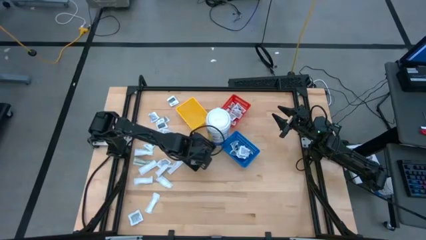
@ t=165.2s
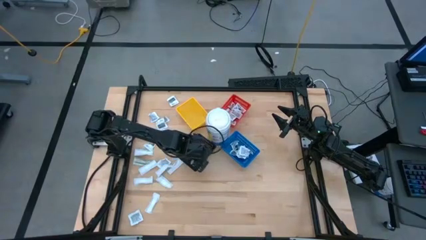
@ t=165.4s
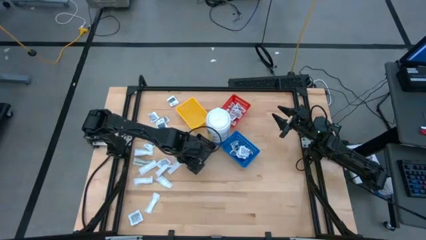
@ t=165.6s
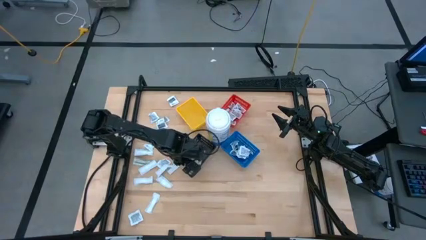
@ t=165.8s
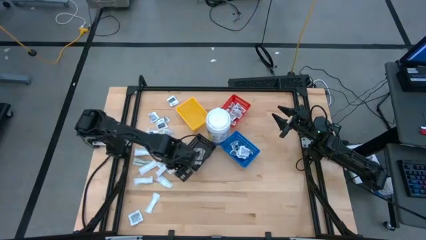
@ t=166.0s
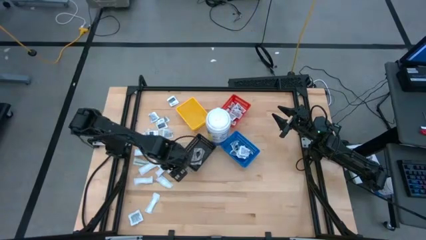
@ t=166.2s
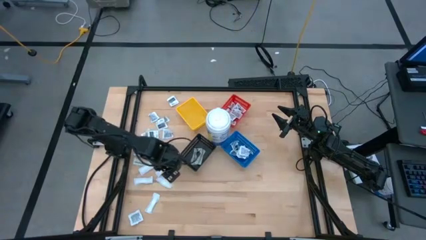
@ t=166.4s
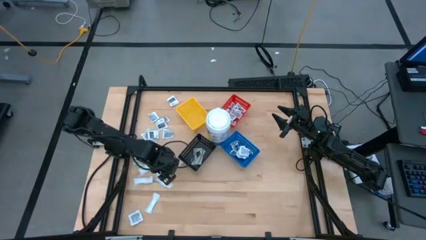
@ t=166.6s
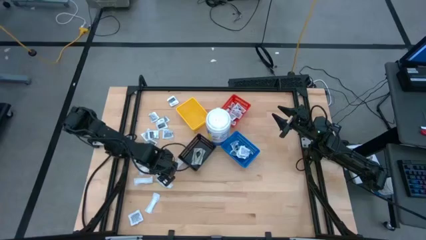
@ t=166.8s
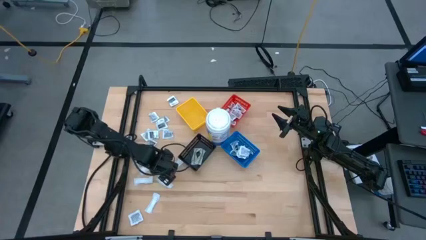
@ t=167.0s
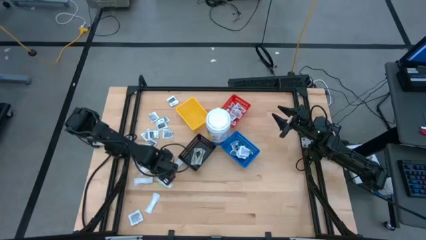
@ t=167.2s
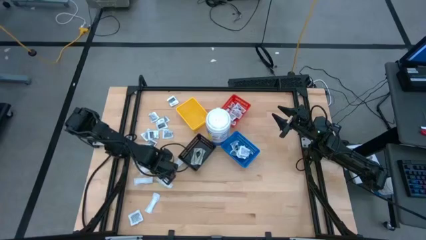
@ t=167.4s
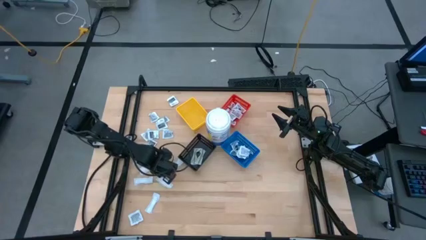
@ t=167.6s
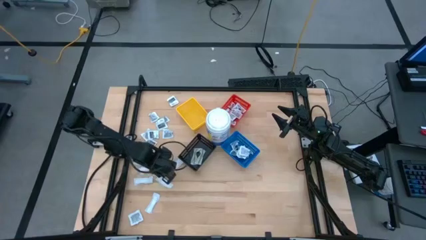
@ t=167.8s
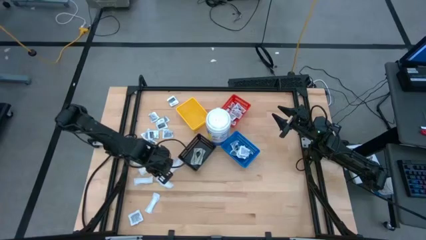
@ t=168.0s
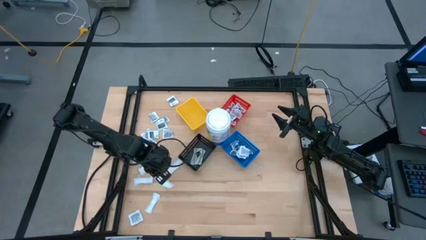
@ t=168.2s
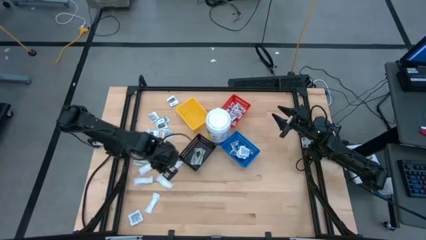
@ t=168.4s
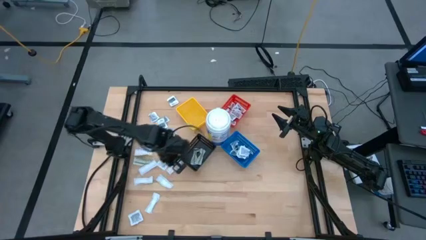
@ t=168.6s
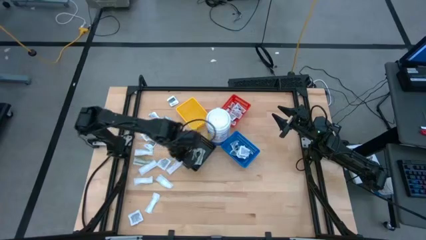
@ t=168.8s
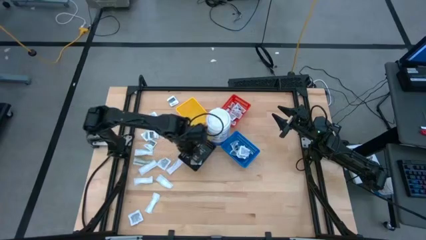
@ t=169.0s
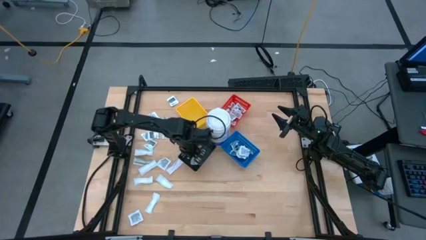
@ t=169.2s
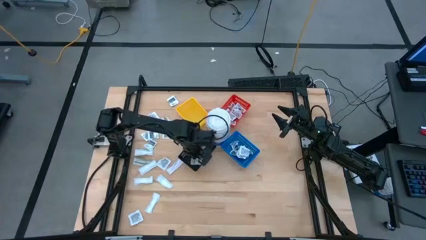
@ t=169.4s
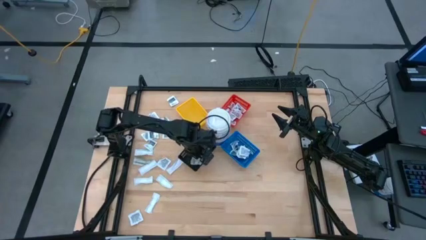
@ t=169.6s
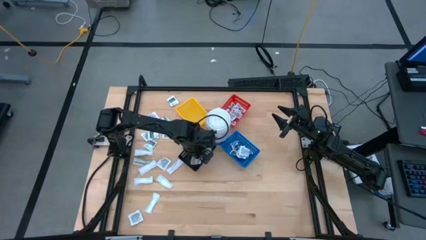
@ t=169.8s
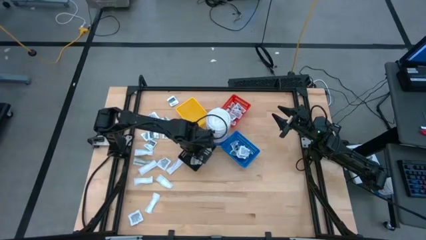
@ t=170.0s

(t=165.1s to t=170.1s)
Task: Pick & Place First Aid Supplies
Put the bandage pack into the black bin

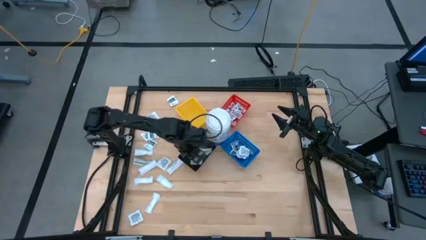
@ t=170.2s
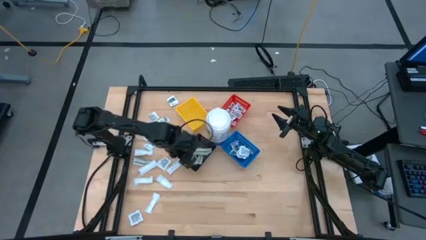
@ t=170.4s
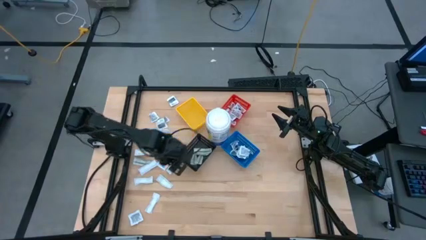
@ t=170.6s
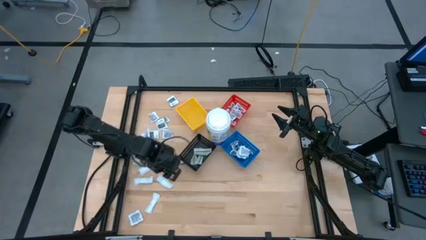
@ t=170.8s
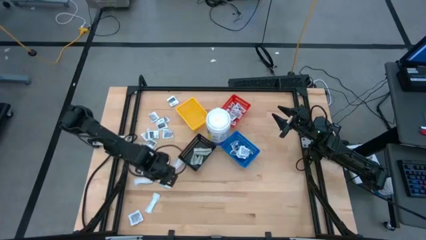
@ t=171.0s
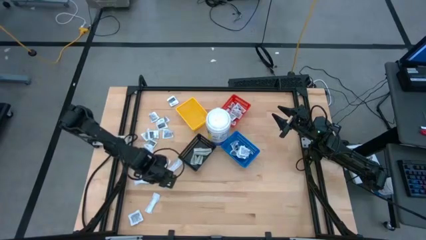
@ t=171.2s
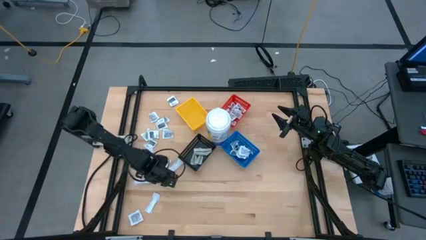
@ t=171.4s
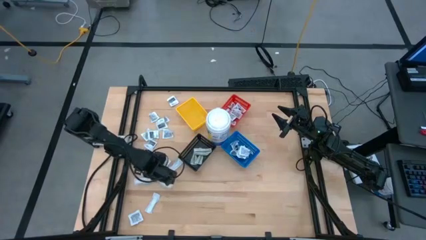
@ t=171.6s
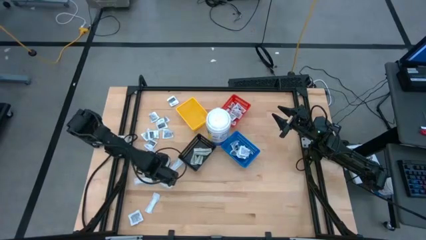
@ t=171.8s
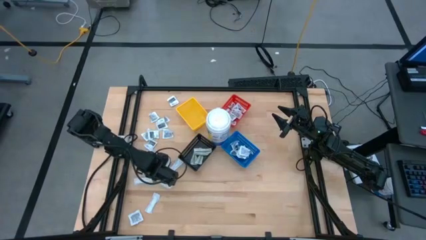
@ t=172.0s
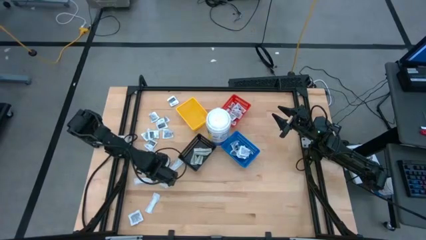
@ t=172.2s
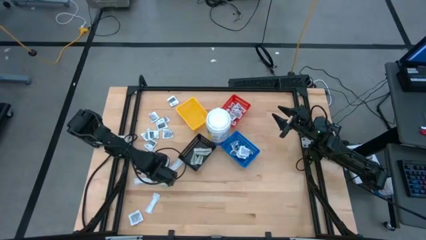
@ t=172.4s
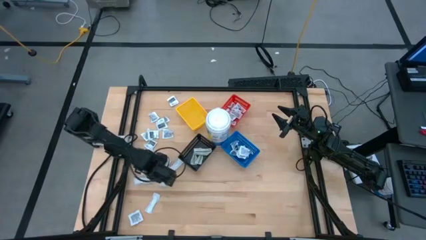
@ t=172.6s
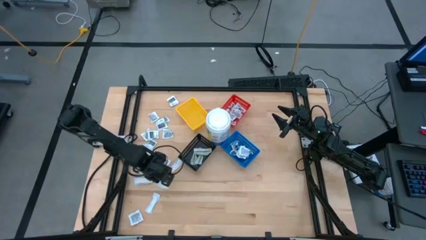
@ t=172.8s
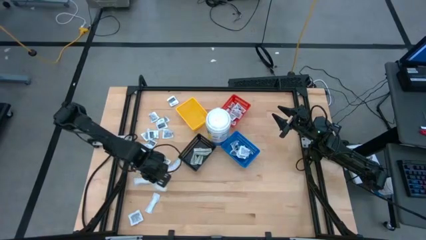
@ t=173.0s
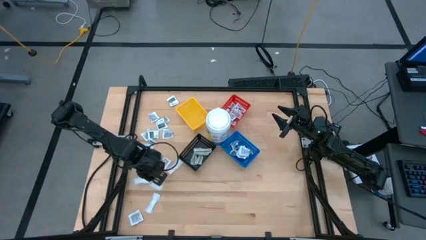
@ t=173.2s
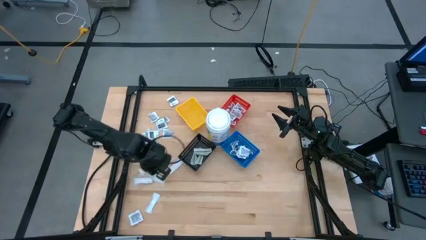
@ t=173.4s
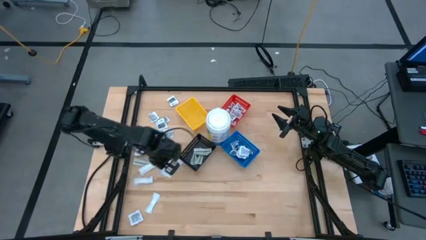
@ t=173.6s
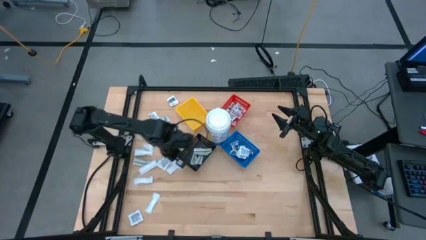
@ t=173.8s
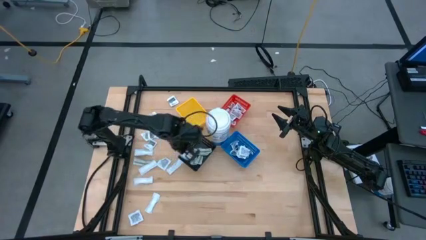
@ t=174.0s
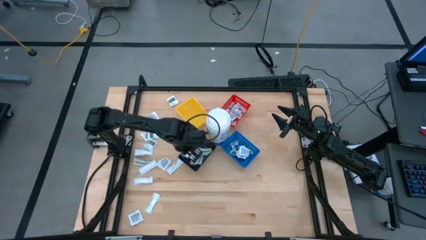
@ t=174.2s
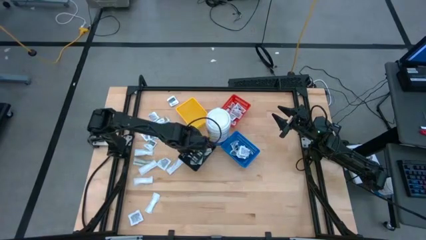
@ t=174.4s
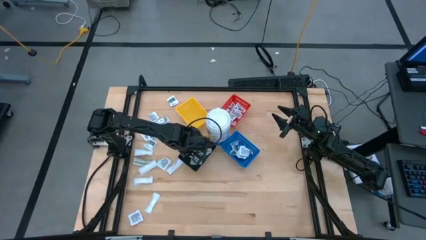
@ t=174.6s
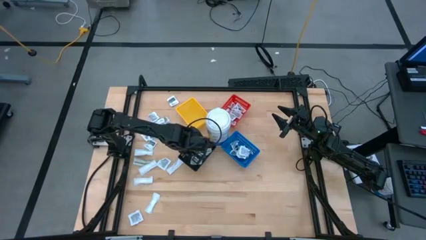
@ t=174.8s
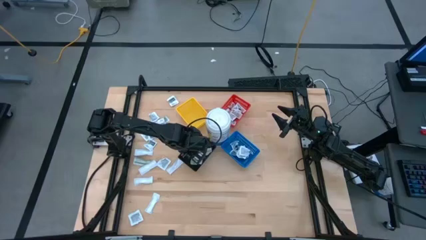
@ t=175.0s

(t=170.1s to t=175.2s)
Put the bandage pack into the black bin

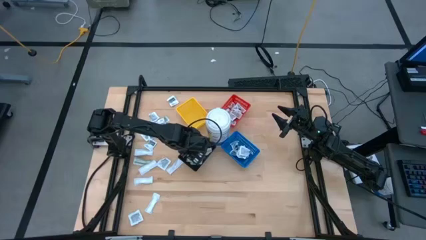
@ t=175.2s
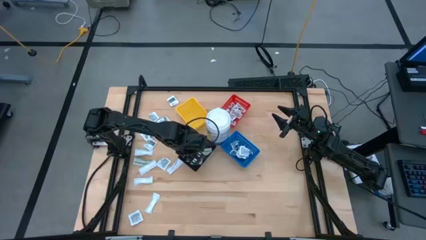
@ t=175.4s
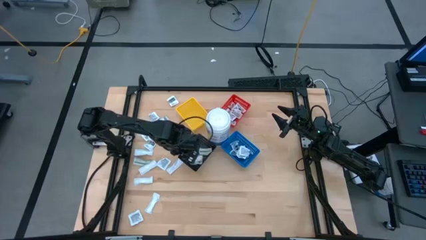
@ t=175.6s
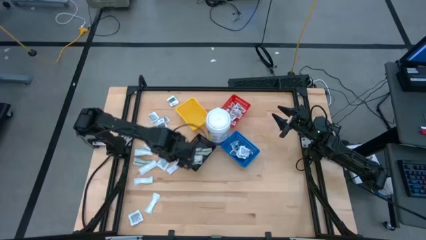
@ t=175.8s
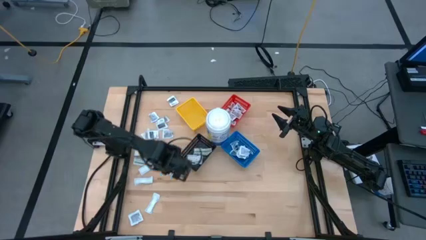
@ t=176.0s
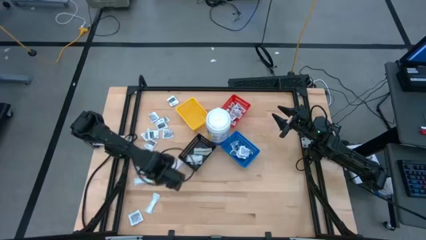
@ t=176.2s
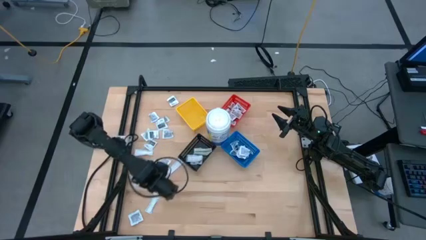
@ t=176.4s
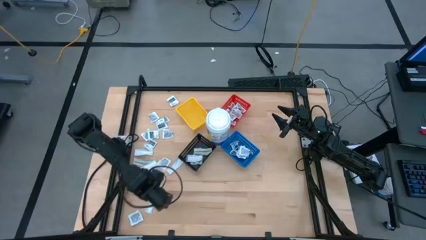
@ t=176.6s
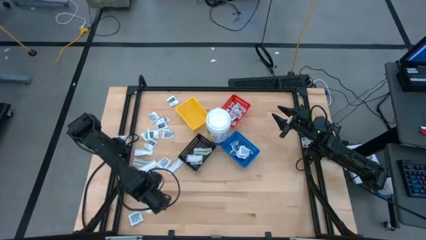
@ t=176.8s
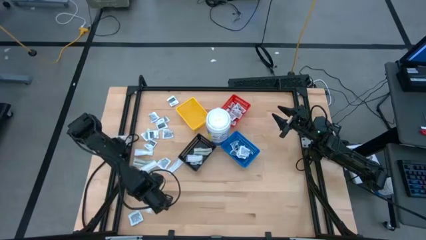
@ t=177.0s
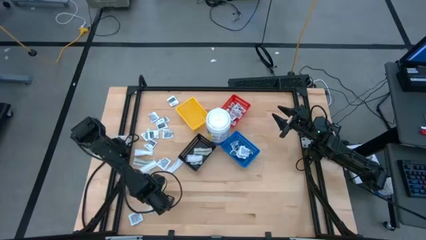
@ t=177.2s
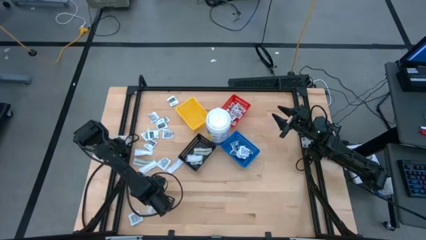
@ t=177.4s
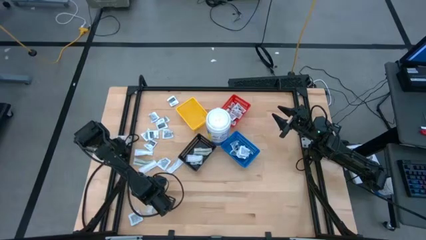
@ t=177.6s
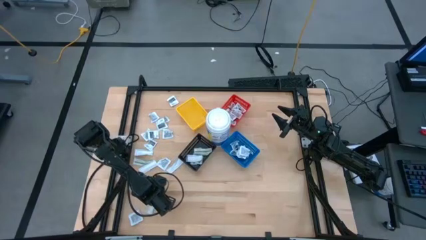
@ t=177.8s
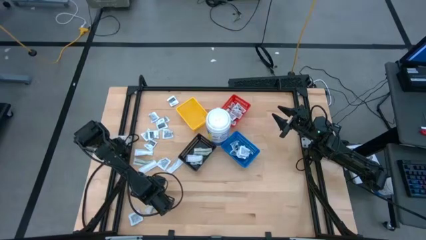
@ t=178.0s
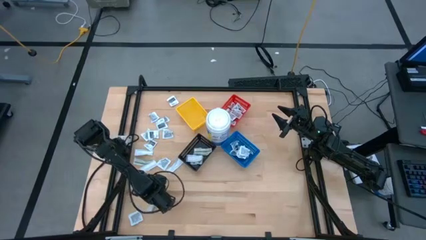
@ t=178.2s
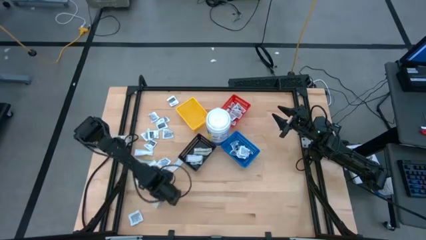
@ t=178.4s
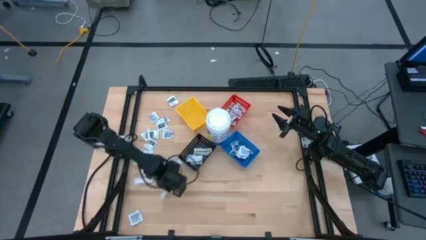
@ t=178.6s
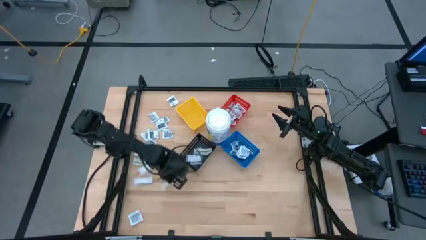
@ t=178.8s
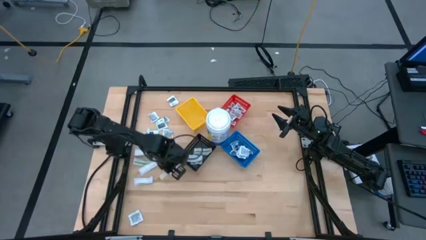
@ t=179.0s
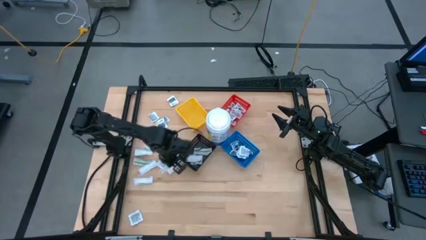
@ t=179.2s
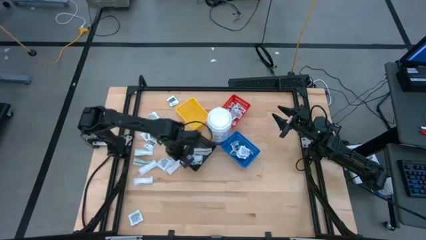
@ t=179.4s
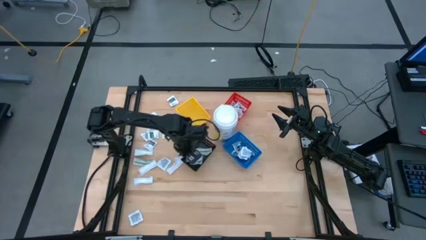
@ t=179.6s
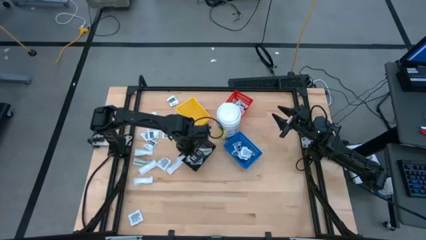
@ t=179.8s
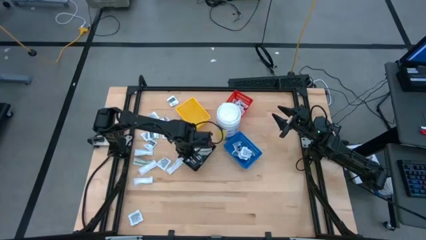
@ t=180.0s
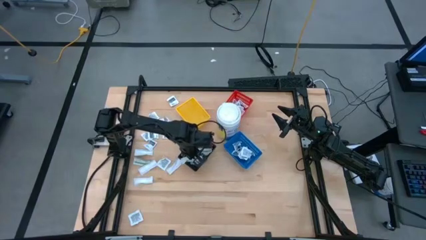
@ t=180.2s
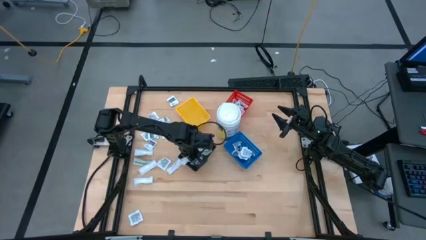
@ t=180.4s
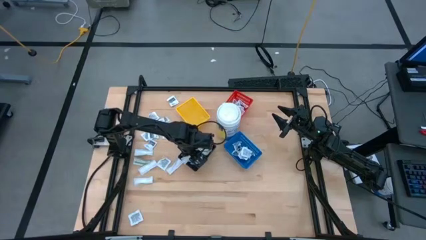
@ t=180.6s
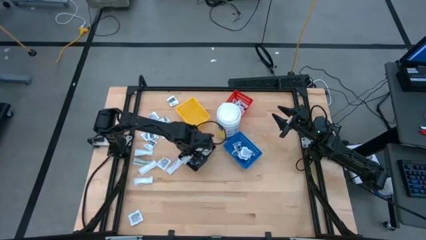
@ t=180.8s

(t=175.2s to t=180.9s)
Put the bandage pack into the black bin
